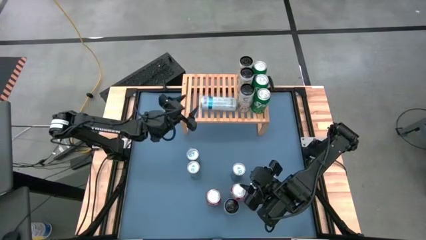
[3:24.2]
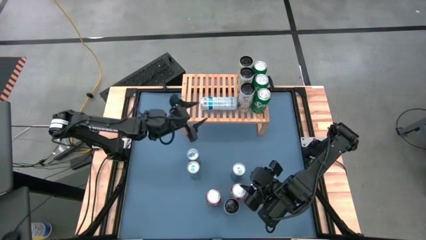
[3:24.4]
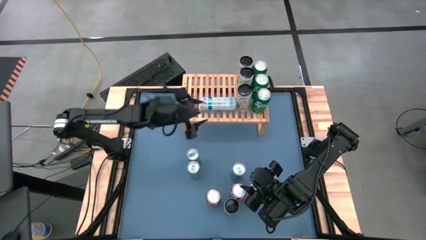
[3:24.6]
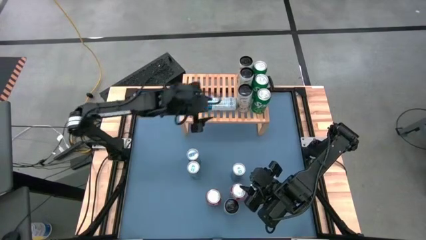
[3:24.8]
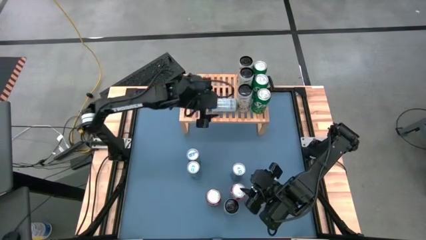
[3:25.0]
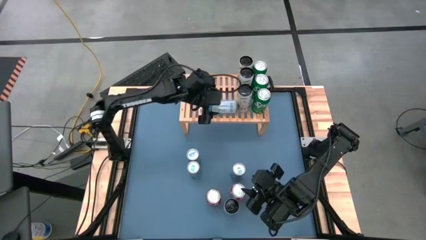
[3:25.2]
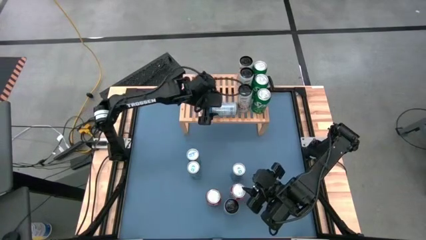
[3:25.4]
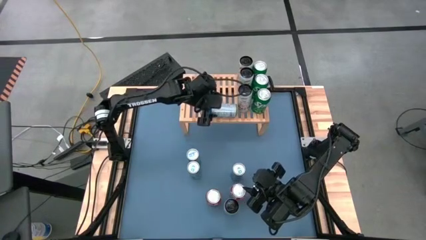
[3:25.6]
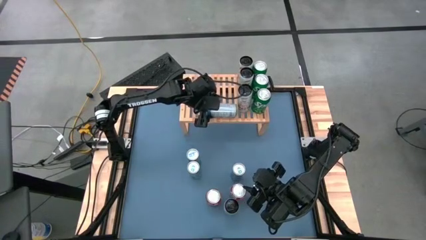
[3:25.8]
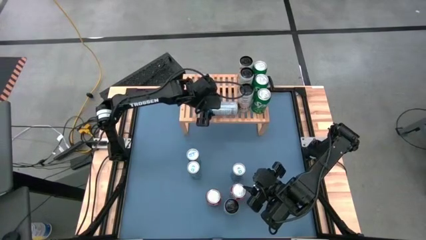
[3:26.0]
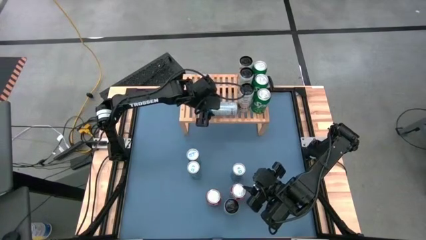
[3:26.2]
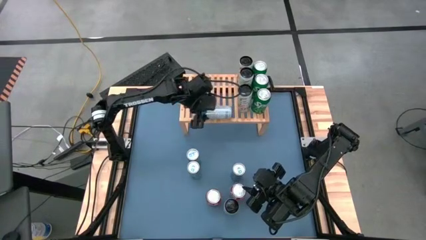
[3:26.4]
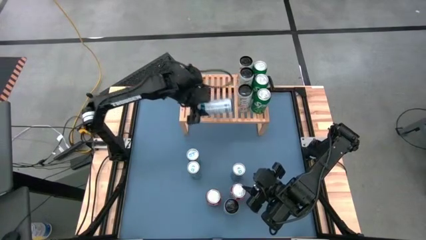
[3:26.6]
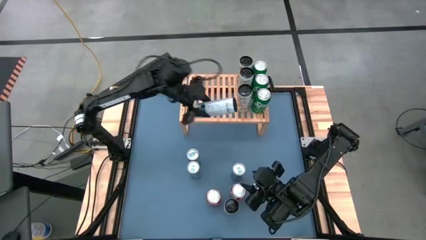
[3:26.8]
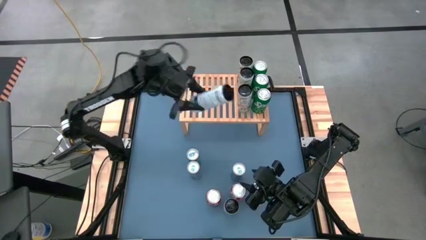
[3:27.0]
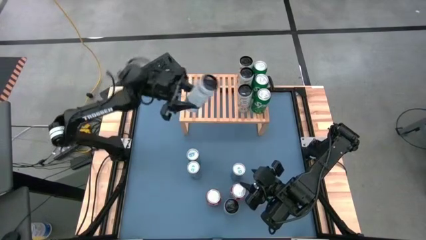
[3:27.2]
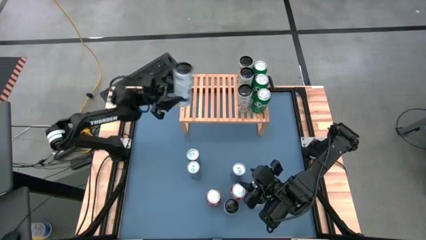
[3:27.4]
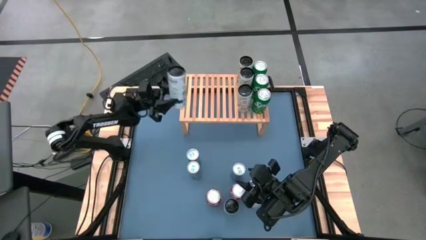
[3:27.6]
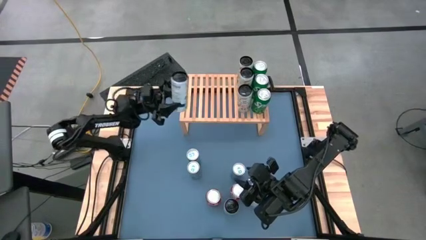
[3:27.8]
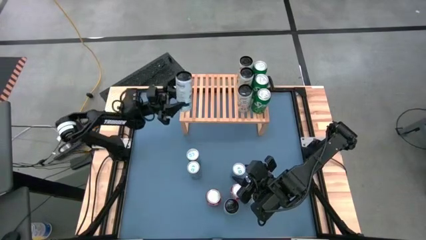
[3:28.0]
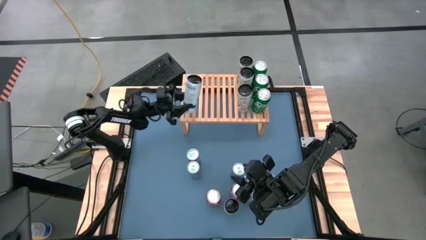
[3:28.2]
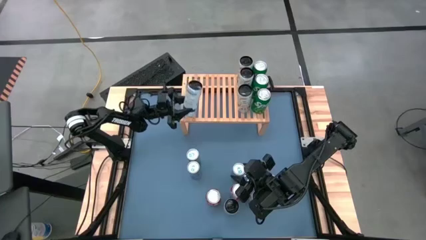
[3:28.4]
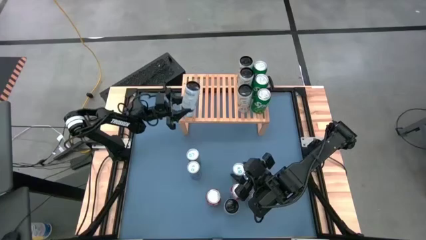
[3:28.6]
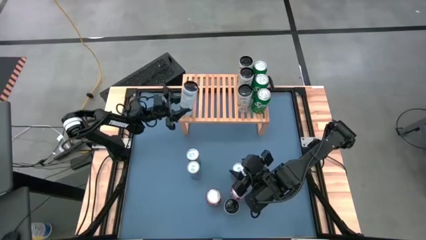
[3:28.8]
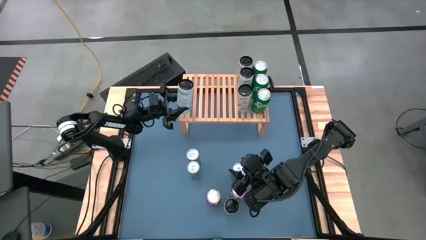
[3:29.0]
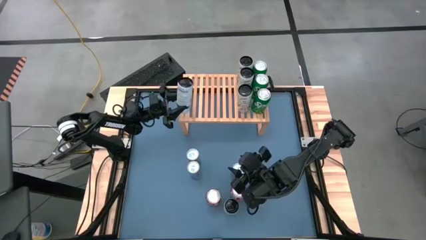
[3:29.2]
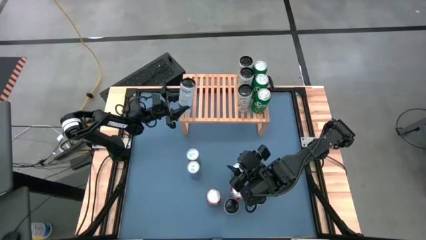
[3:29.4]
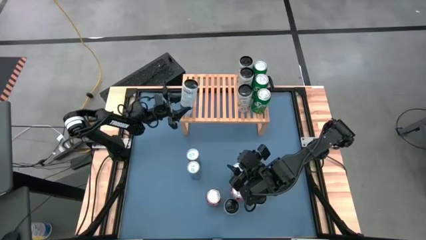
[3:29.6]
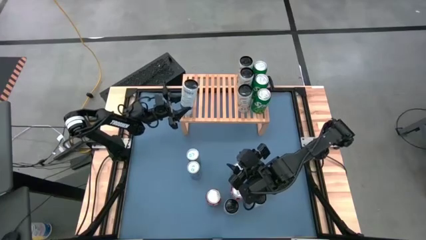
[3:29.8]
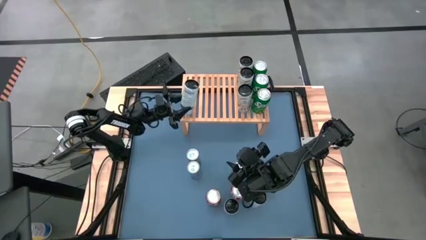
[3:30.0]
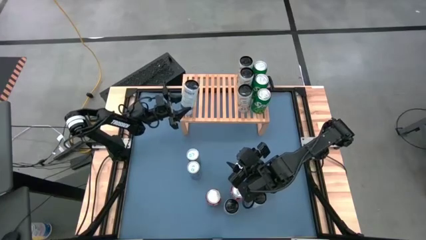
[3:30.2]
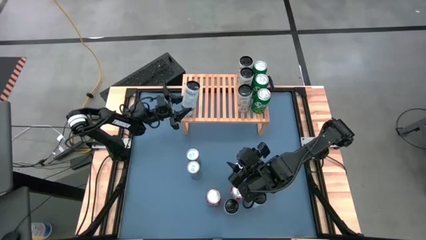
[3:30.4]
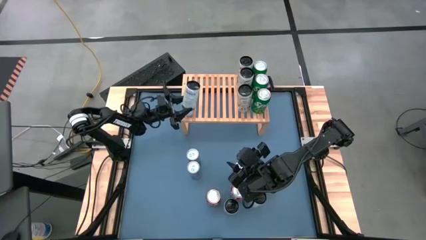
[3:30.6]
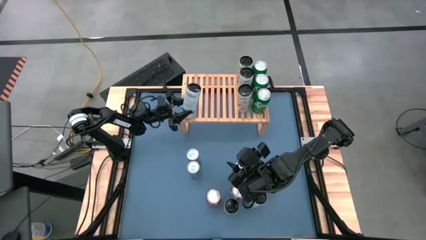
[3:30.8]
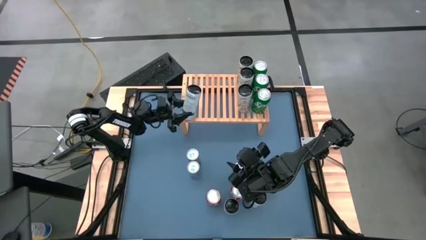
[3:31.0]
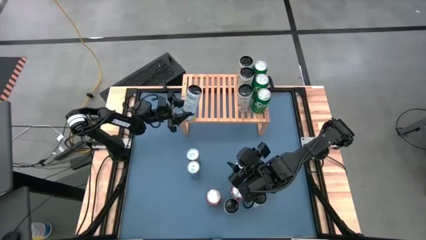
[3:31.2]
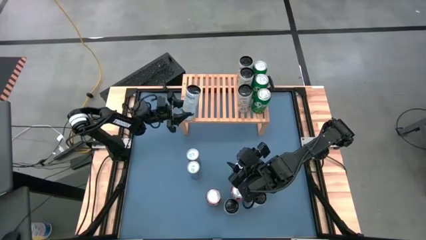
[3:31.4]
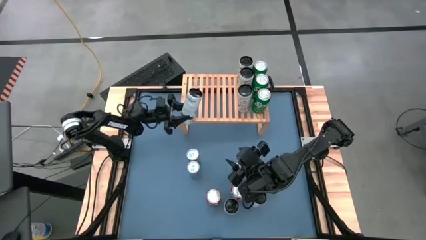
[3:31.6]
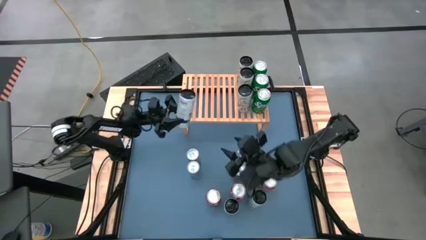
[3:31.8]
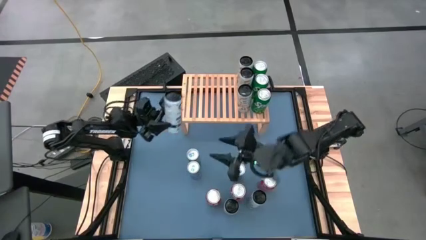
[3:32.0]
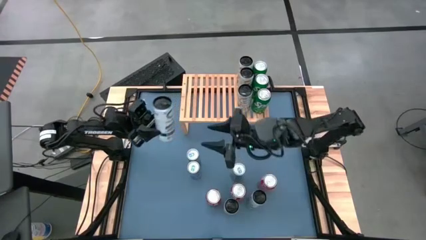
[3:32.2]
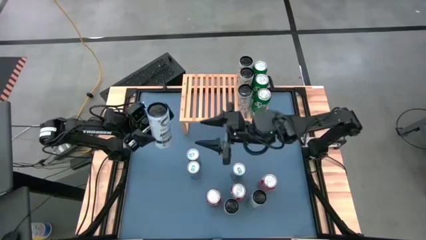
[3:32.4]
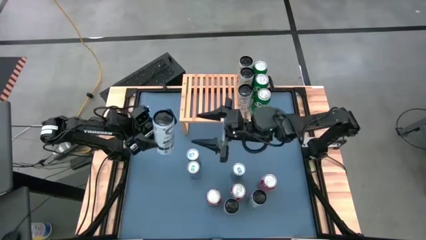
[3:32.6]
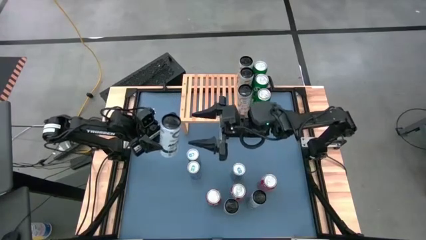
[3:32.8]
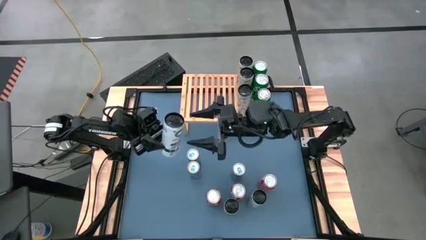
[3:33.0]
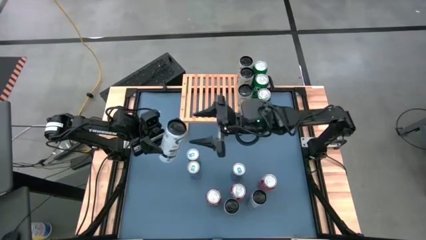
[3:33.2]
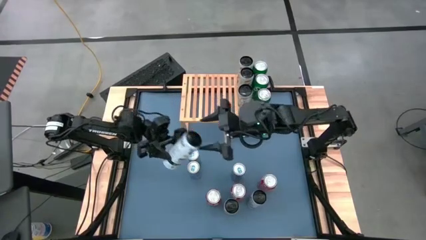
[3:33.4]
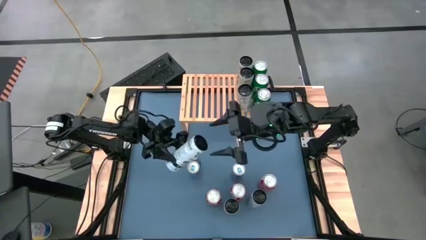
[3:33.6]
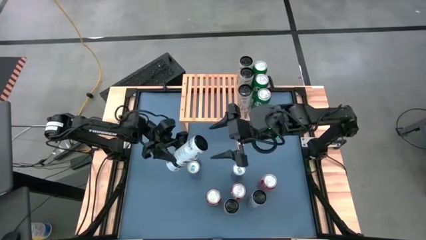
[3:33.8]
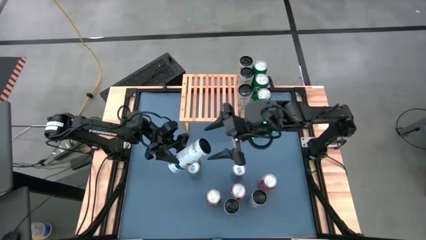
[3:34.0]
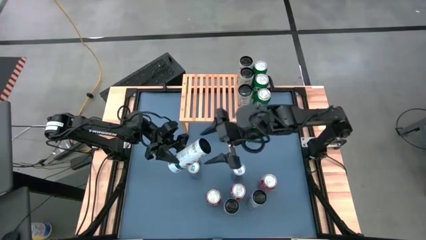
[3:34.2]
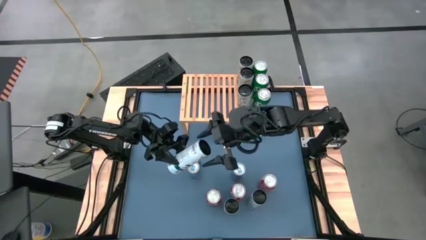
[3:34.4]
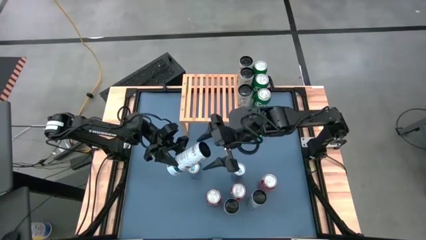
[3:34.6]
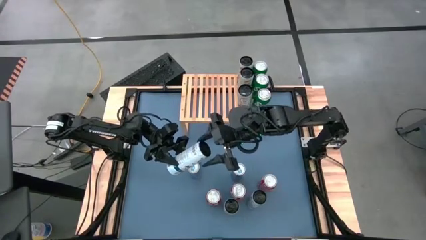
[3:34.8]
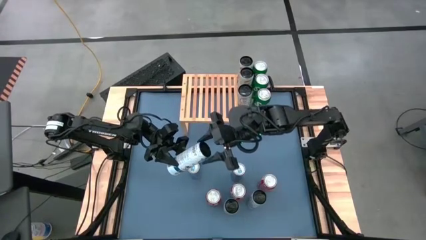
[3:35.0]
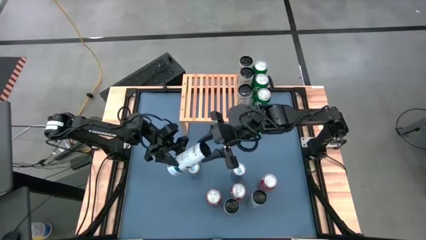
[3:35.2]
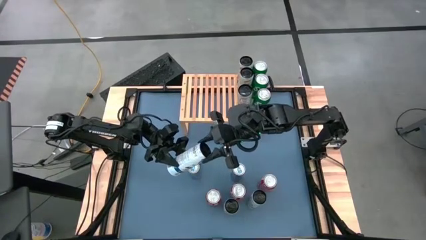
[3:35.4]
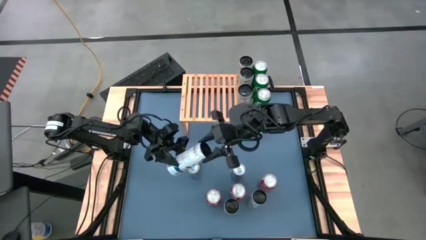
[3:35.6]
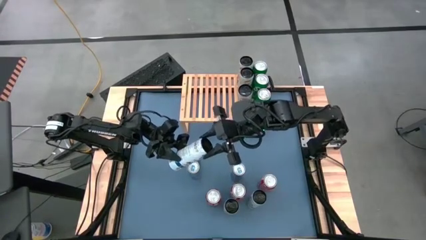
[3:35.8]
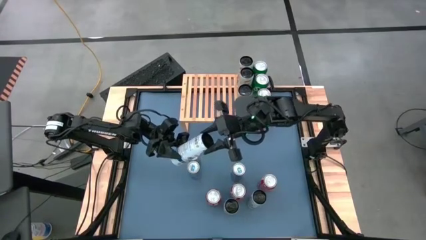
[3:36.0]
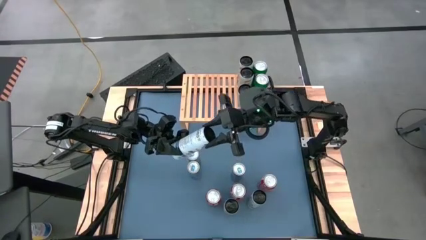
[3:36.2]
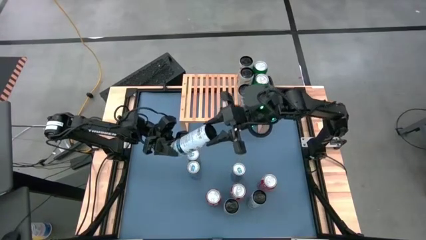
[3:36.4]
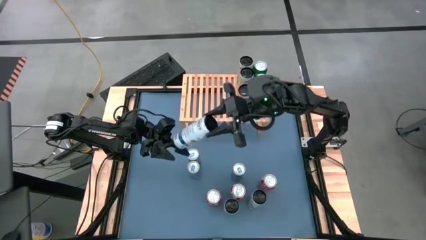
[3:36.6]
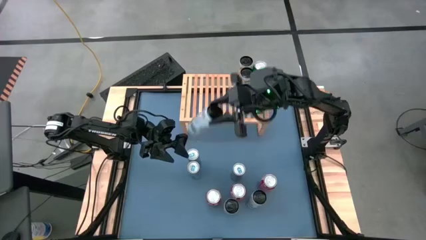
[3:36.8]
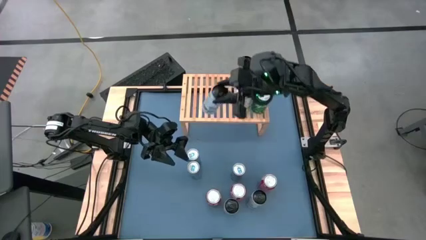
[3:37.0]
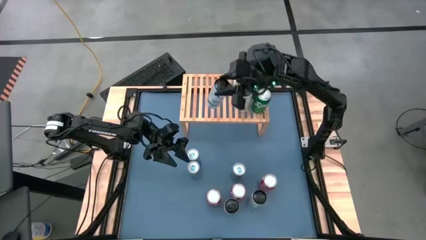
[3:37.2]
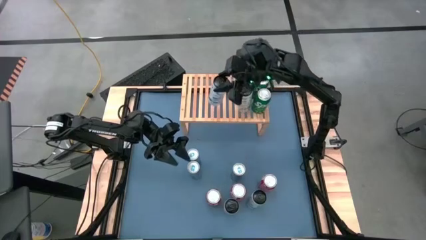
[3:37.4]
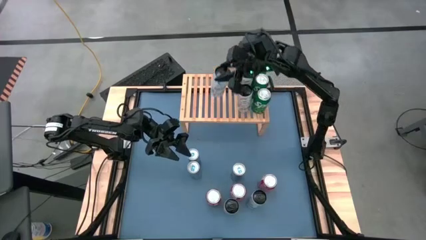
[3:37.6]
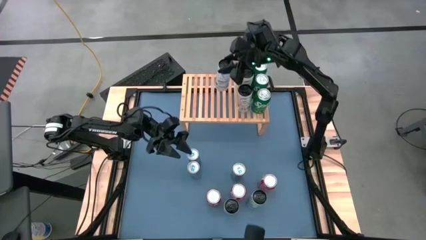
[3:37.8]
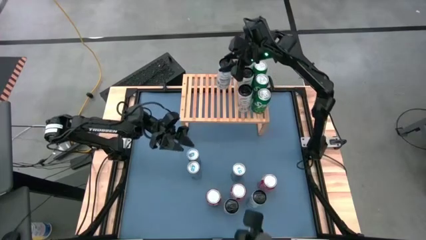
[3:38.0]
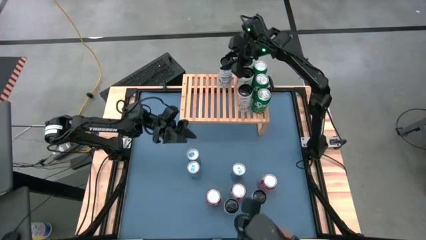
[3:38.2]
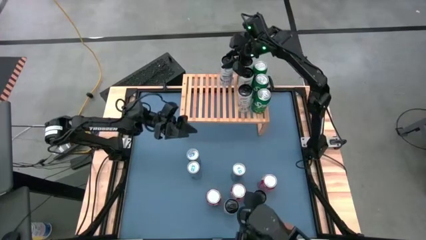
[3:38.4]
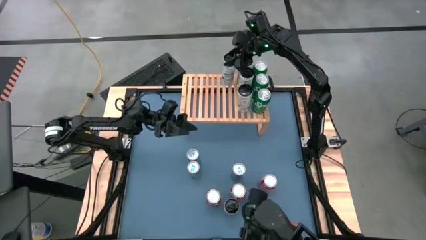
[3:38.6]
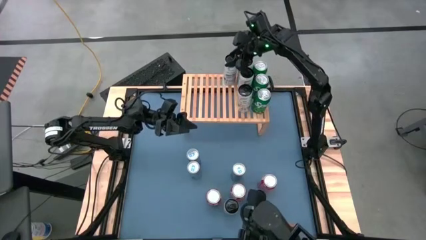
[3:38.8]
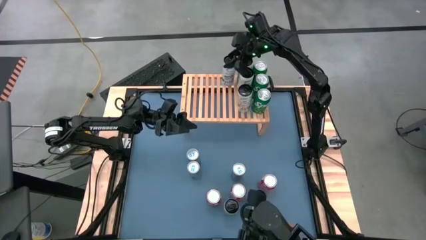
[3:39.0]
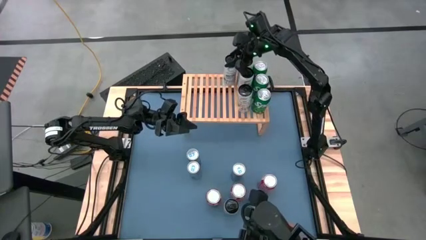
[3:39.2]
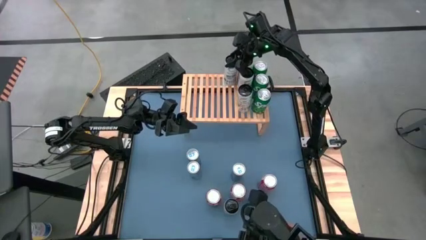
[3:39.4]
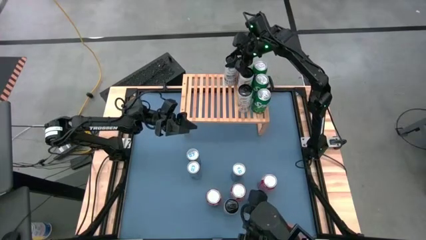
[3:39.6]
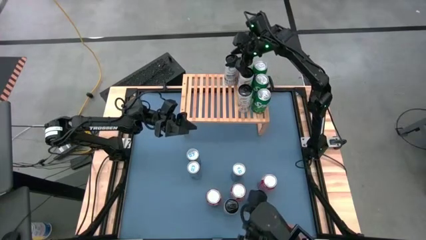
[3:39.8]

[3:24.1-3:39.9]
Task: Place canned beverage on shelf
Put the left white-blue soda can on the shelf
